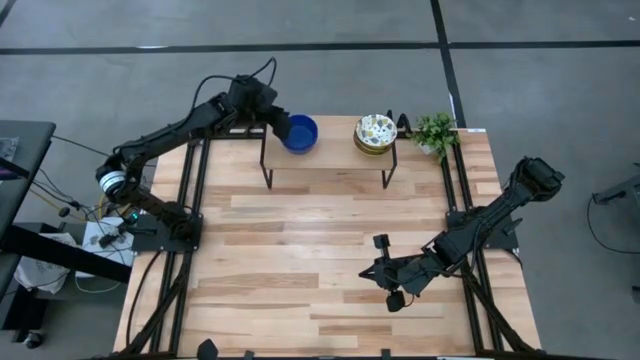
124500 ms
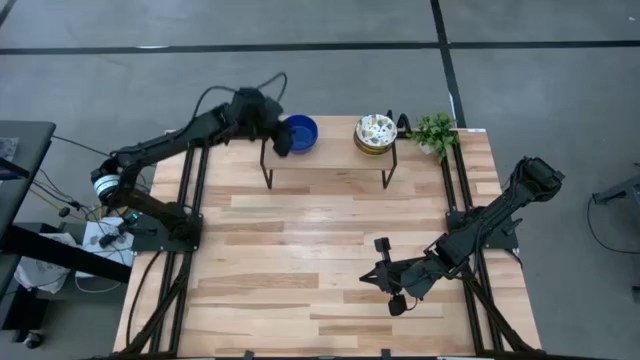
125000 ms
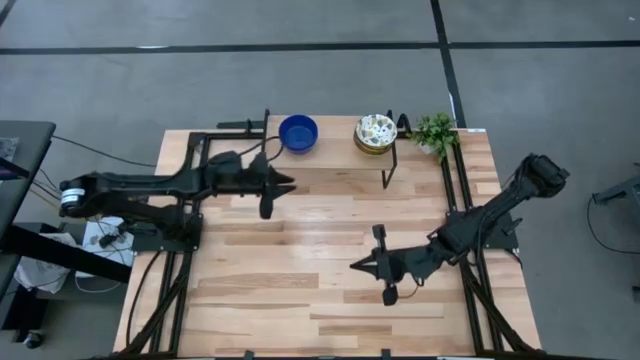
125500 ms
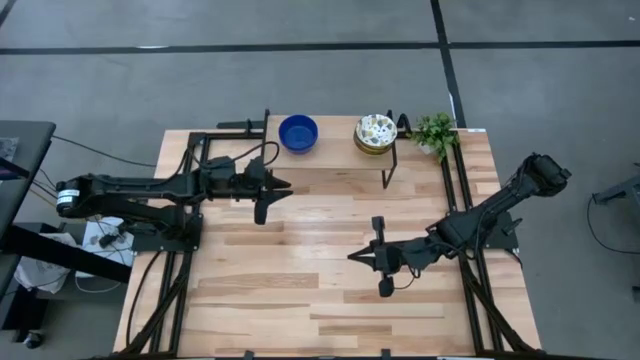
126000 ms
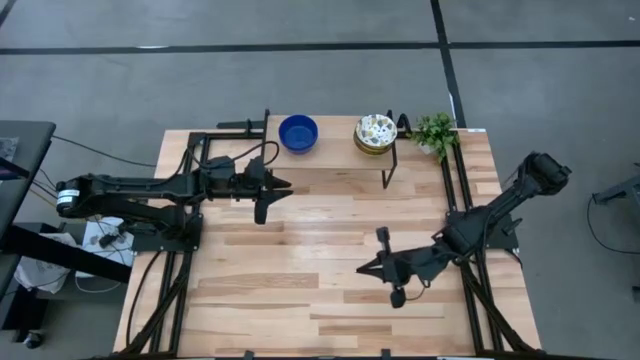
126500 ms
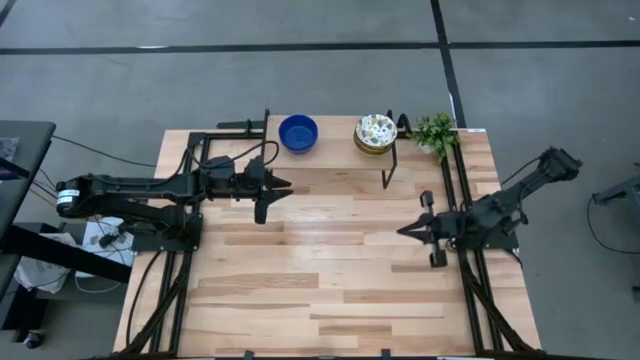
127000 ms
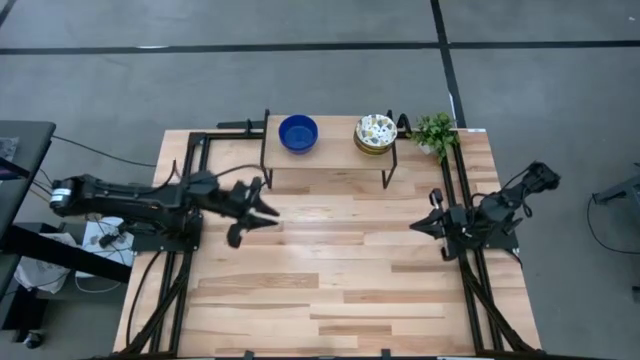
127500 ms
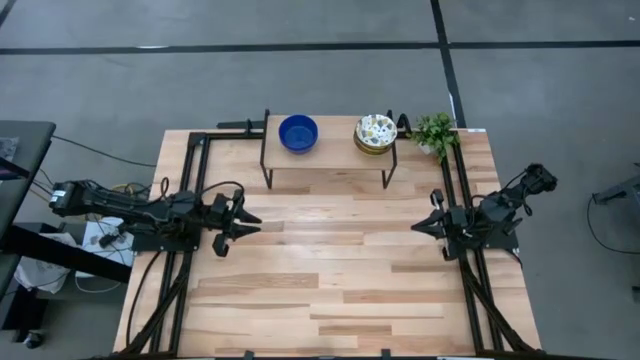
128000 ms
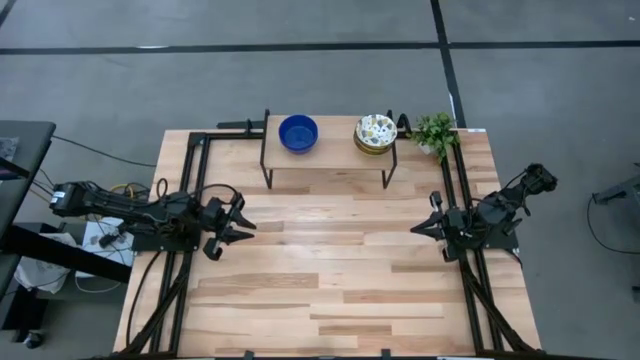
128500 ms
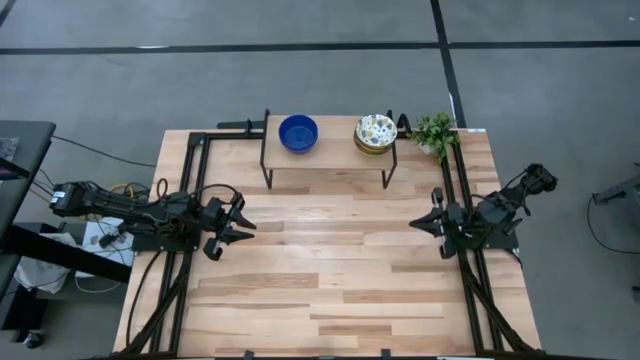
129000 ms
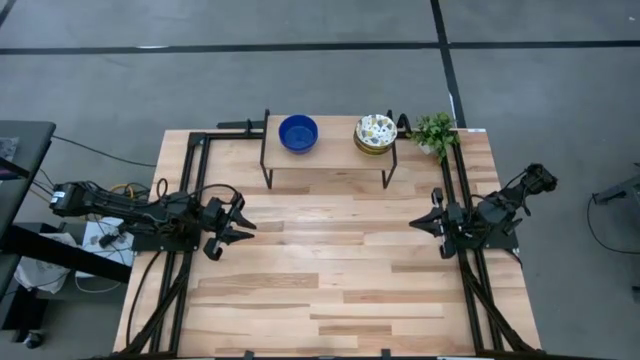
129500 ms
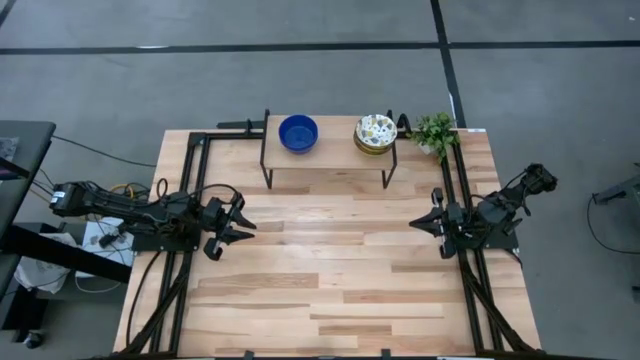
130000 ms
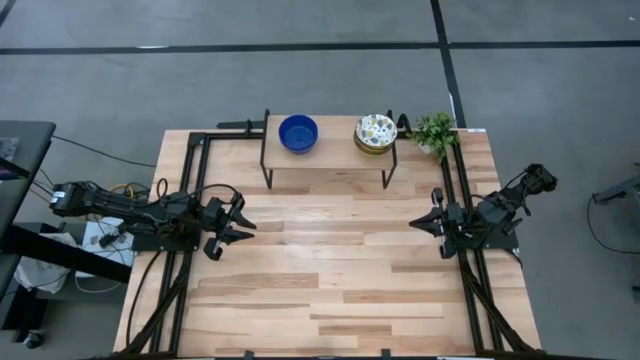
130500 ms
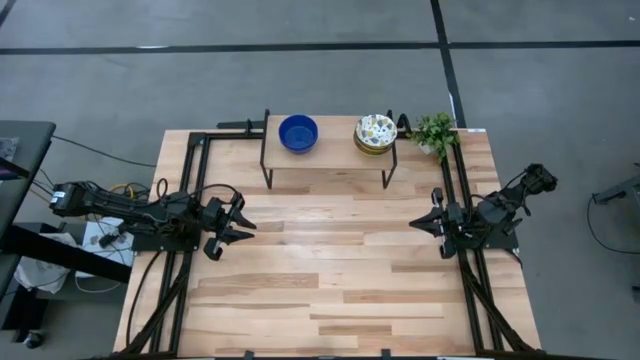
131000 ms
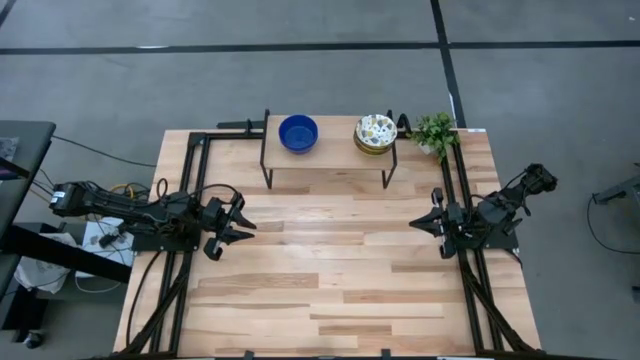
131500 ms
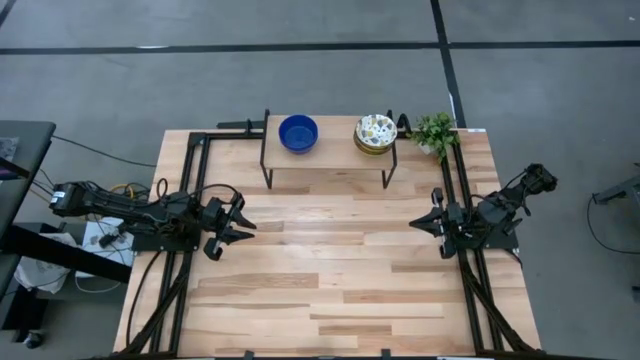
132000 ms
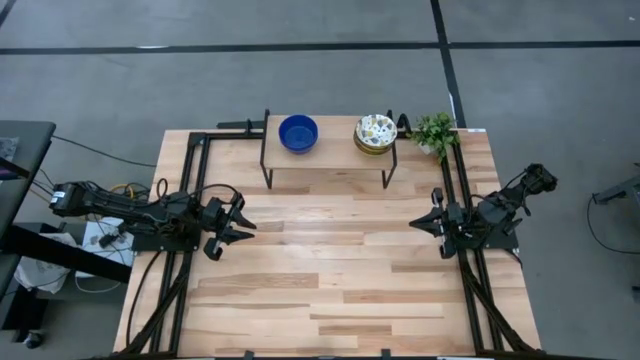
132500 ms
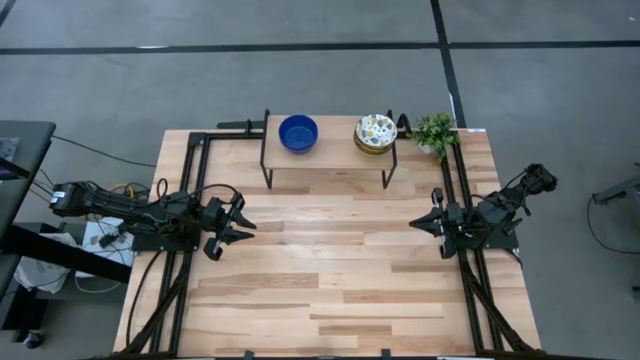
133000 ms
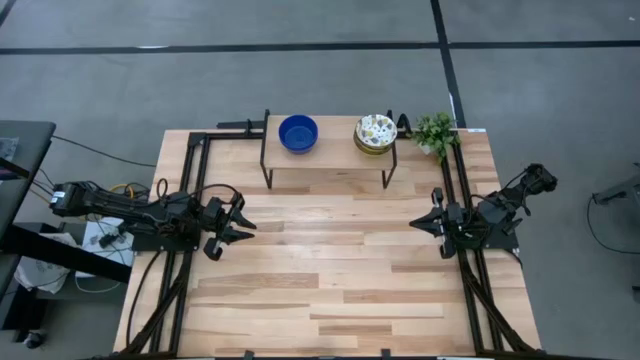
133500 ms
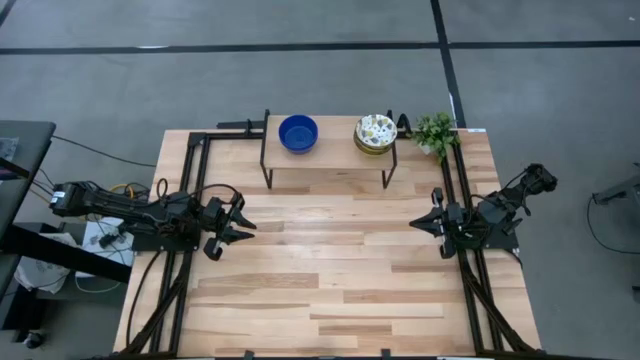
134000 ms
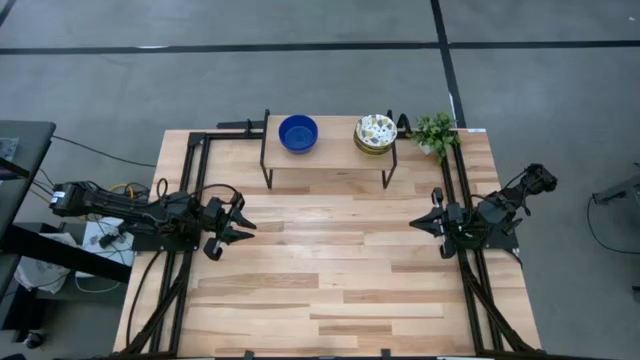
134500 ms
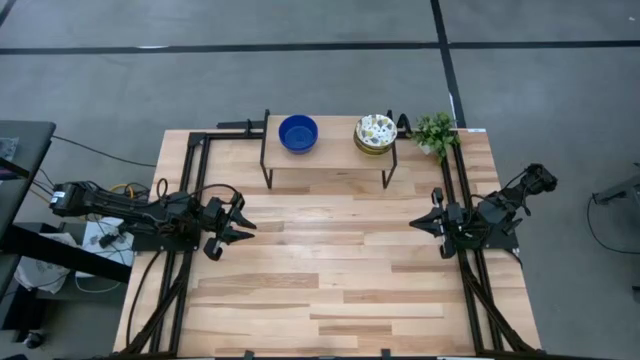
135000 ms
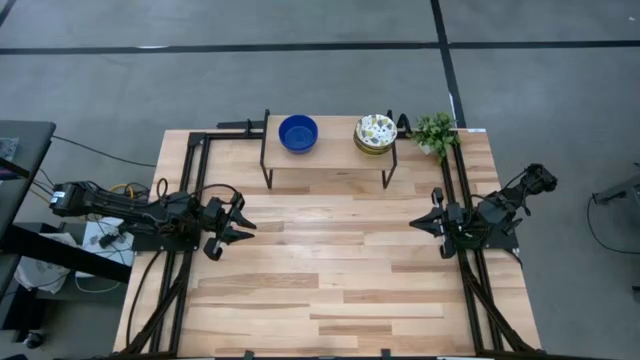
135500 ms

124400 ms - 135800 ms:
Task: Pick & Place Mini bowls
Return to Home Position

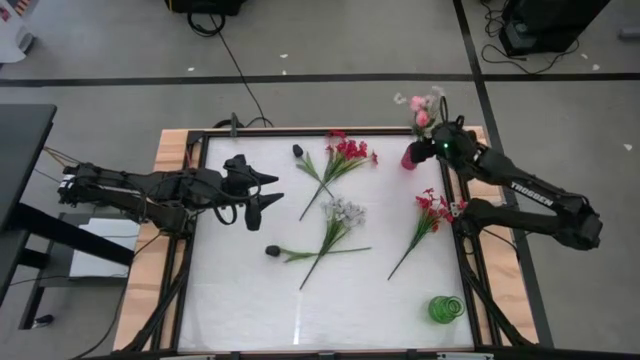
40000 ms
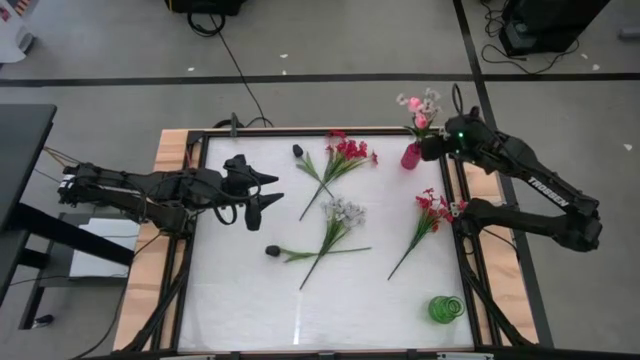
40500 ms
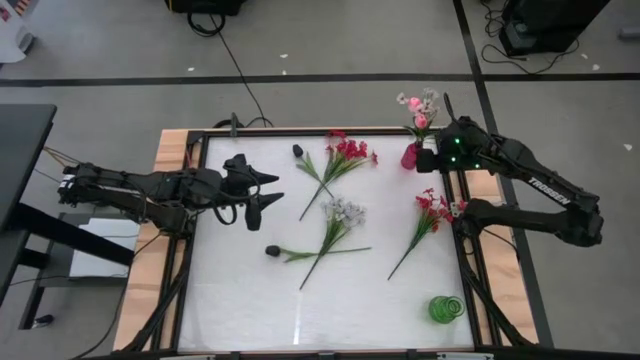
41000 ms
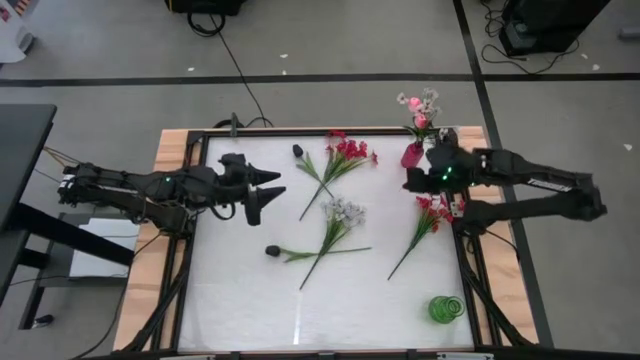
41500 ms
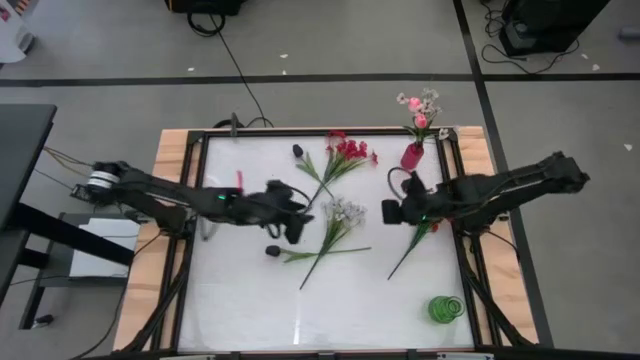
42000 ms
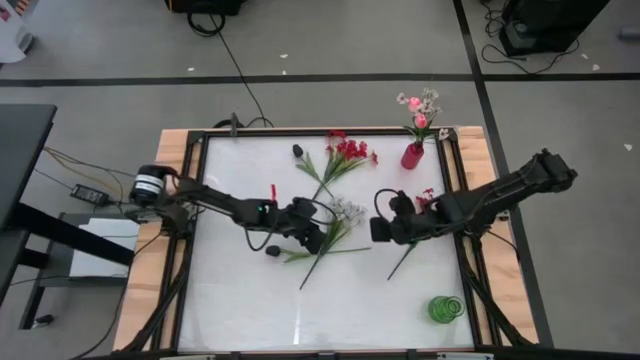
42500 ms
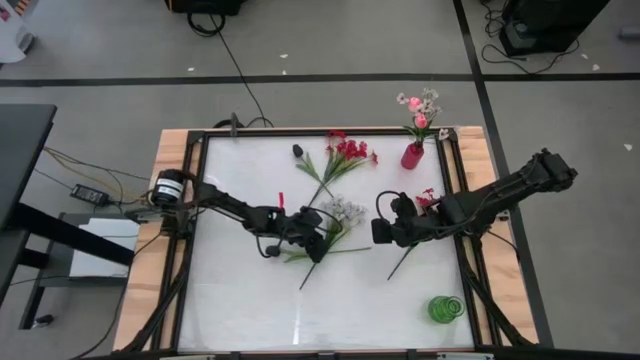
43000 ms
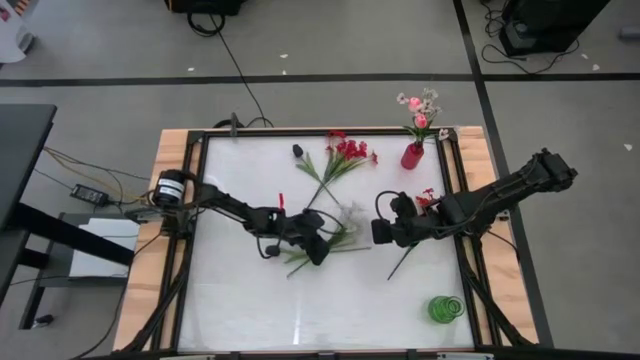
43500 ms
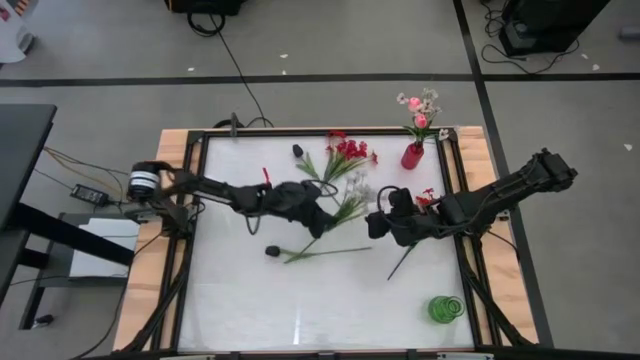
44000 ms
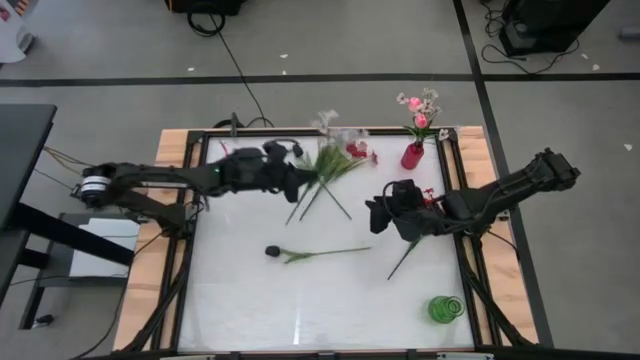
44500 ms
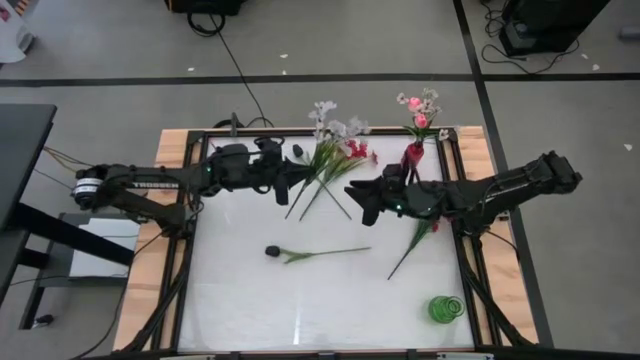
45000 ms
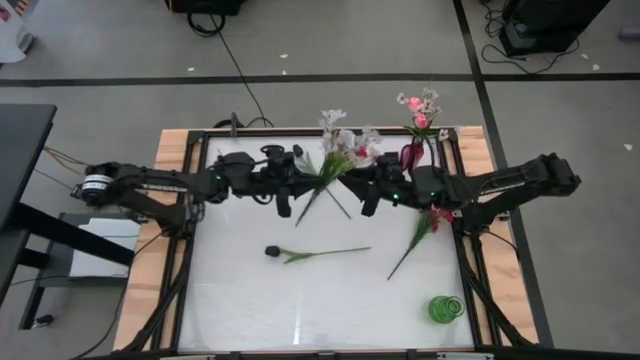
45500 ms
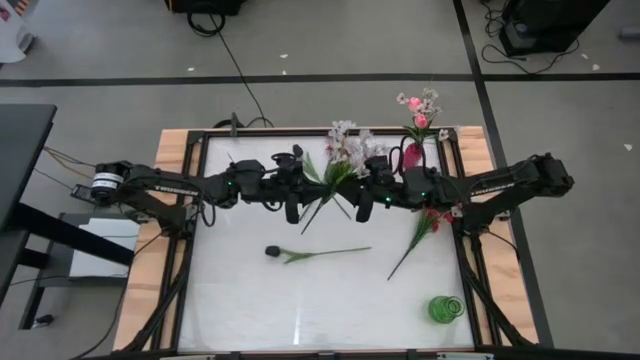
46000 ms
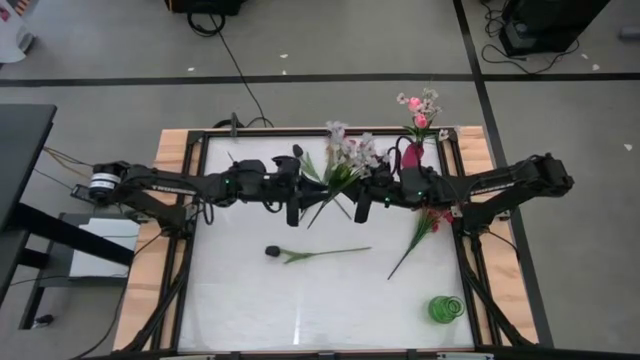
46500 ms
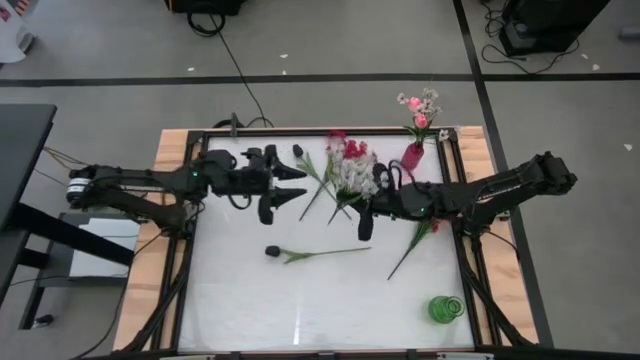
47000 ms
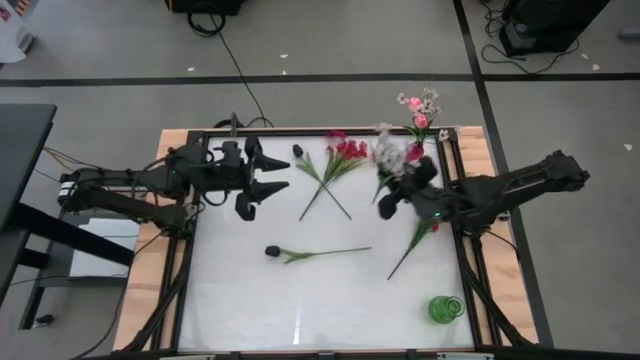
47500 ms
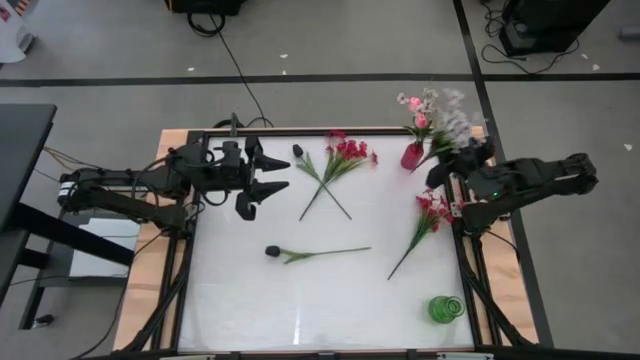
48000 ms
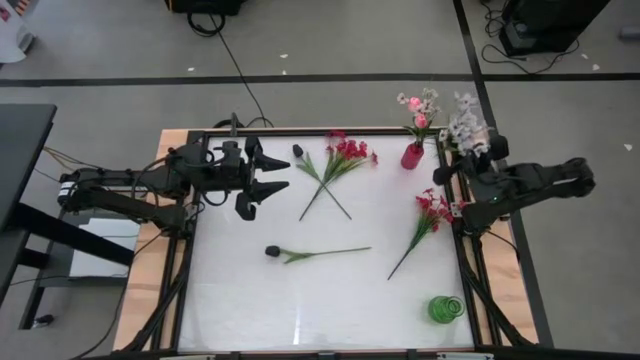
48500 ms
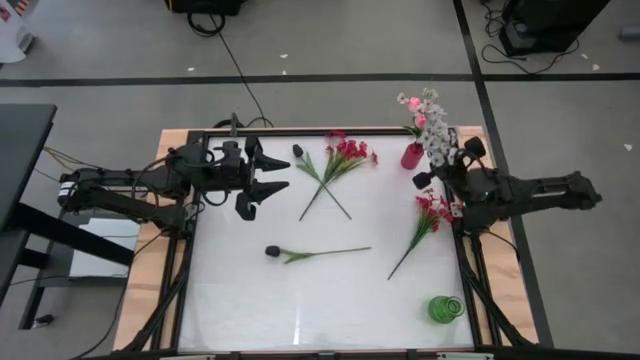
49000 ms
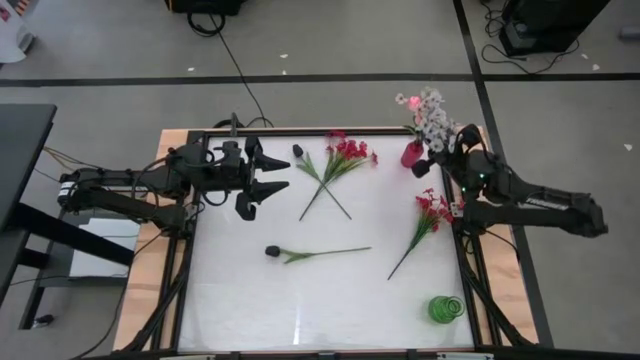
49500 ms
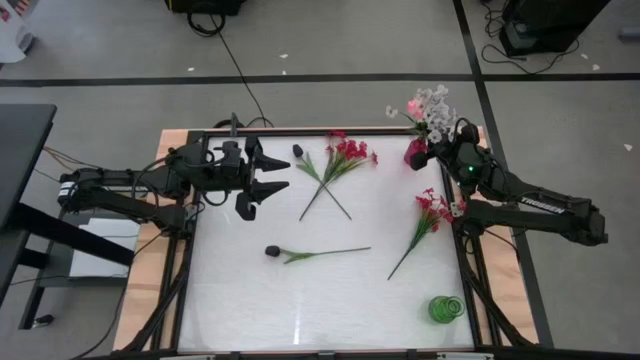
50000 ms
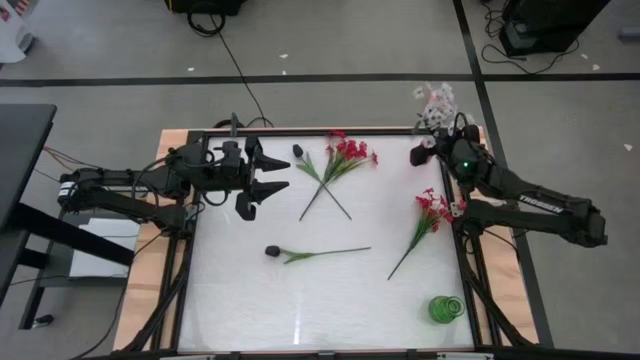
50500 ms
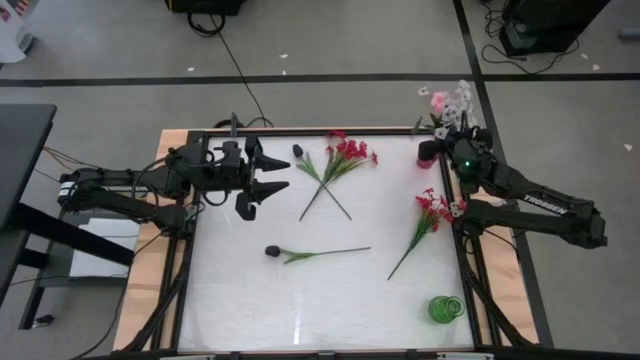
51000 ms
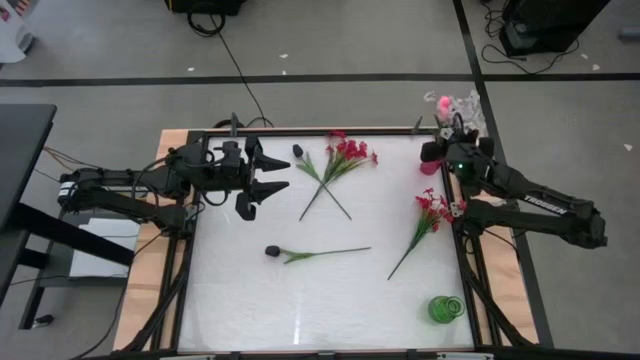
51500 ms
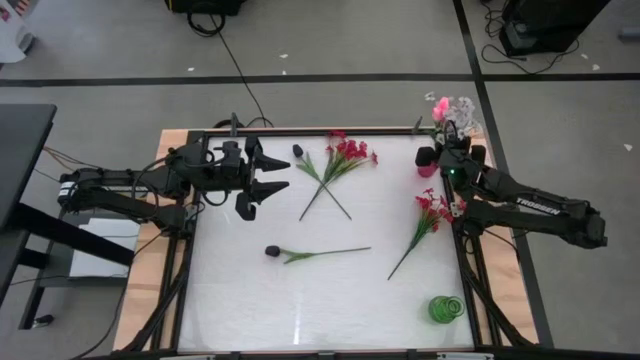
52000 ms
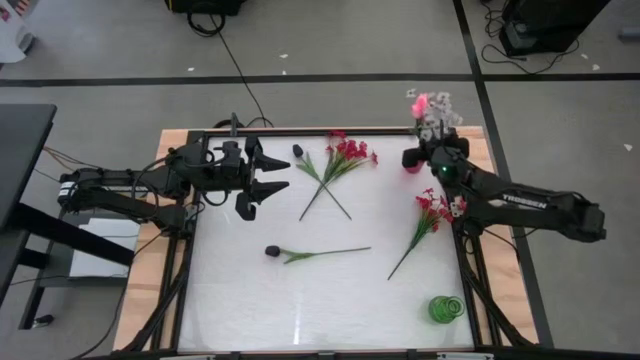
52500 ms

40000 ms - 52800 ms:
Task: Sort flowers into vase by color
Put the white flowers into the red vase
